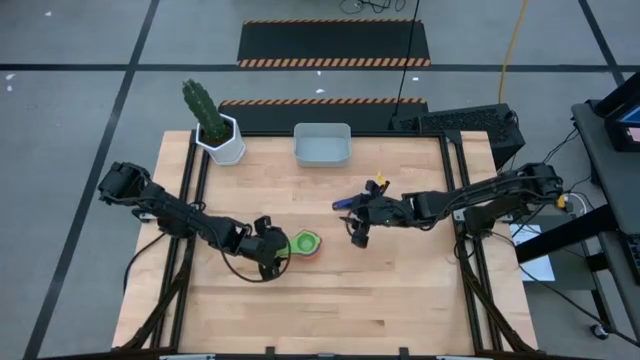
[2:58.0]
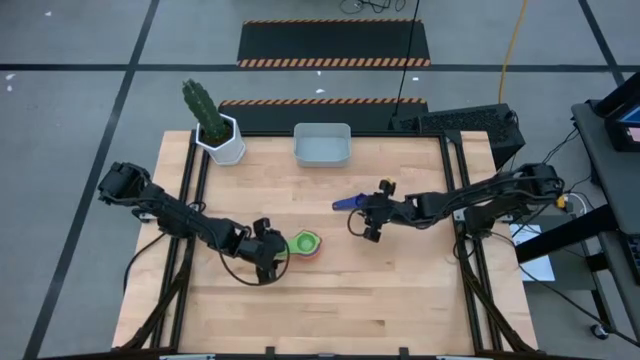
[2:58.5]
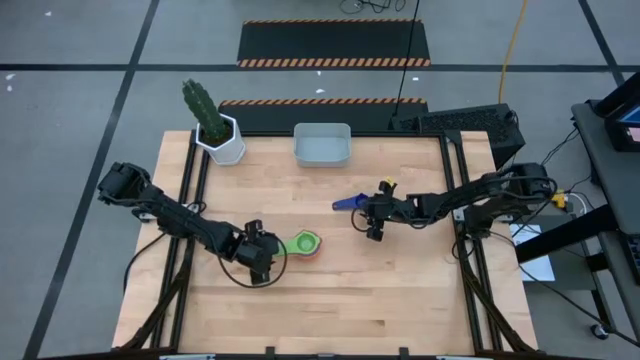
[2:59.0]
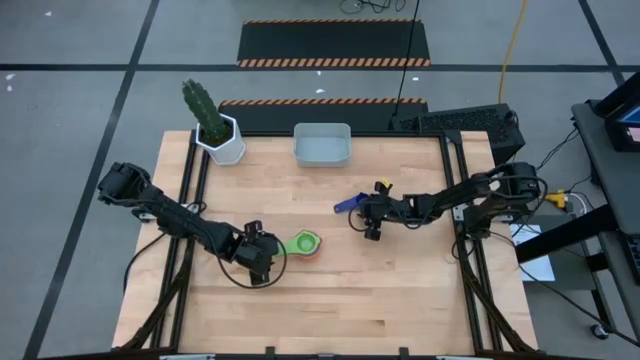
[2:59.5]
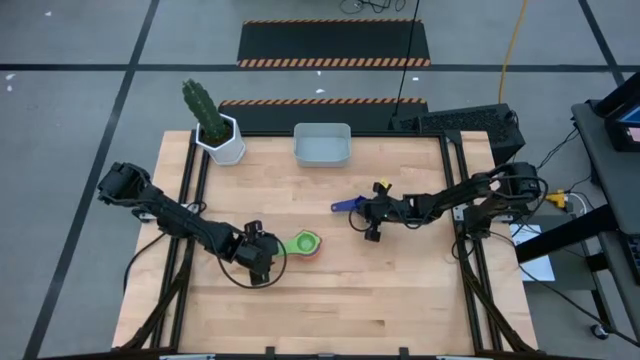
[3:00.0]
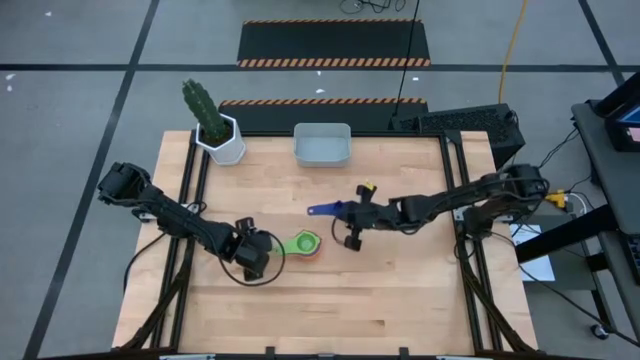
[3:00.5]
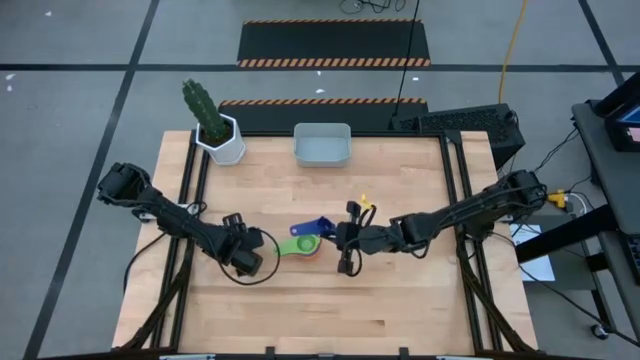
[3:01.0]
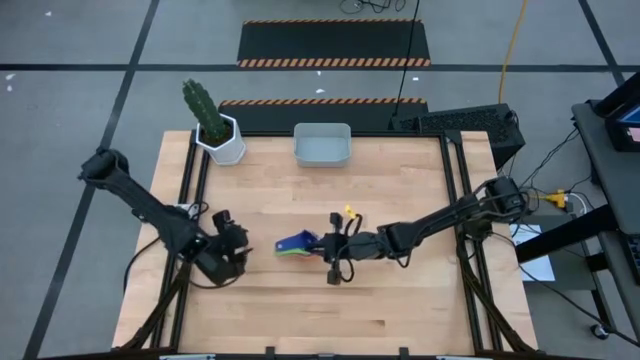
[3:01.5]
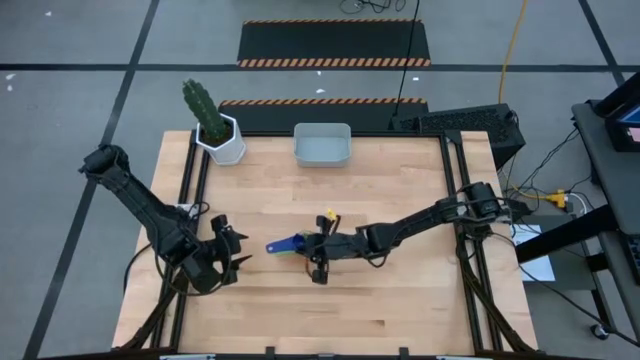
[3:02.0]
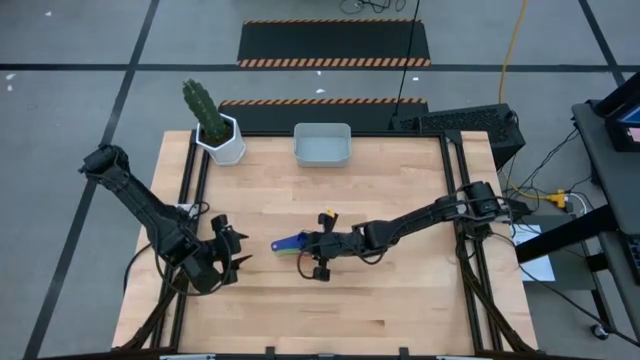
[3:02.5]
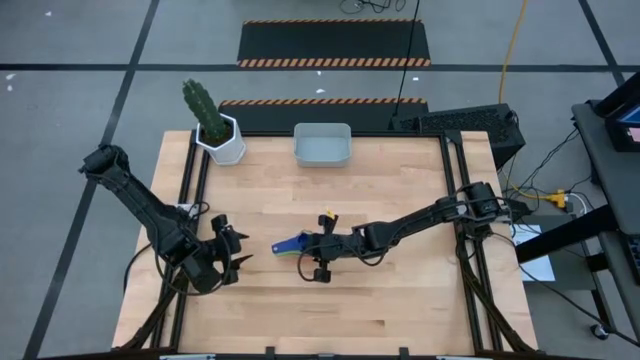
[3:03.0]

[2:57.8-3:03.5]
Task: Nest measuring cups in basket
Stack the violet measuring cup on top of the green measuring cup

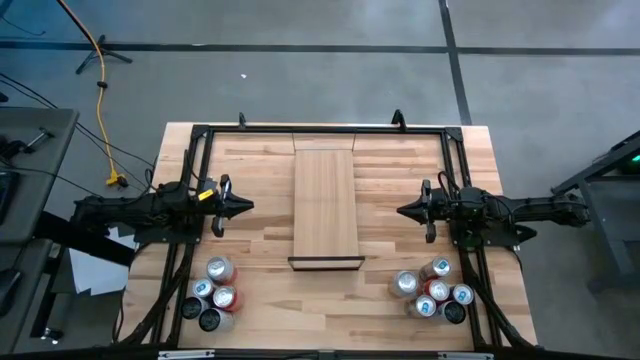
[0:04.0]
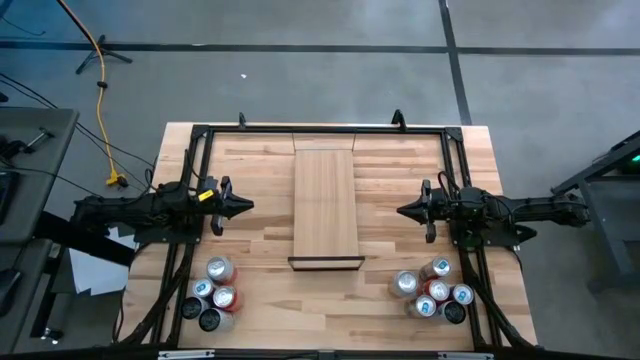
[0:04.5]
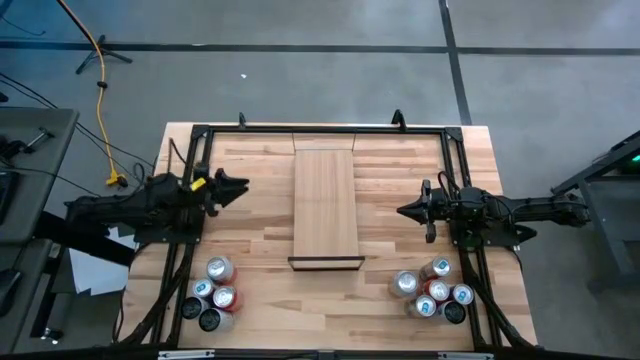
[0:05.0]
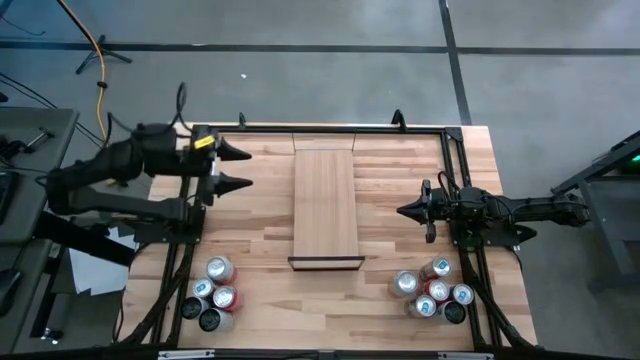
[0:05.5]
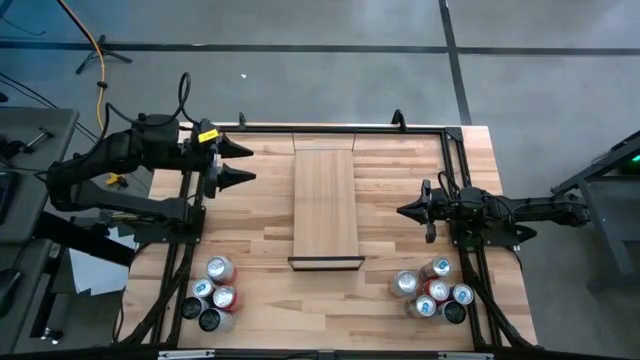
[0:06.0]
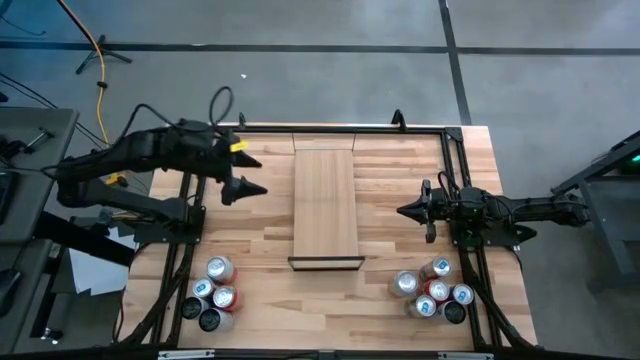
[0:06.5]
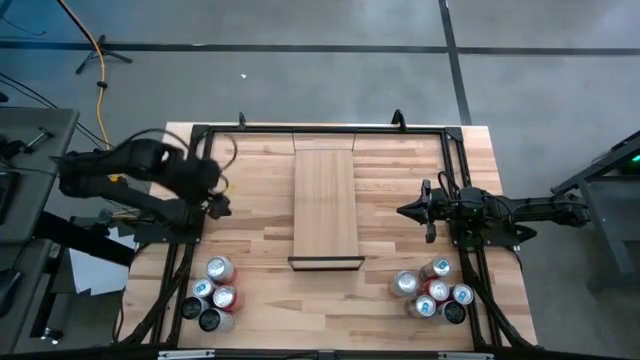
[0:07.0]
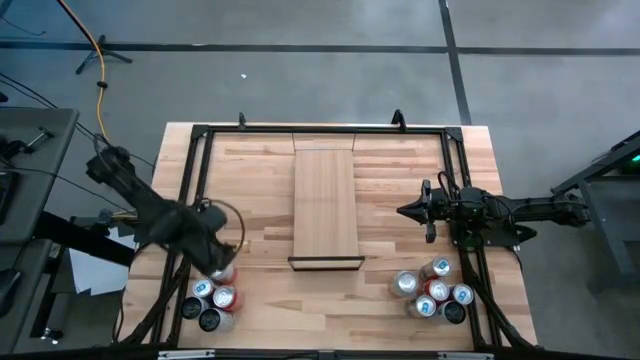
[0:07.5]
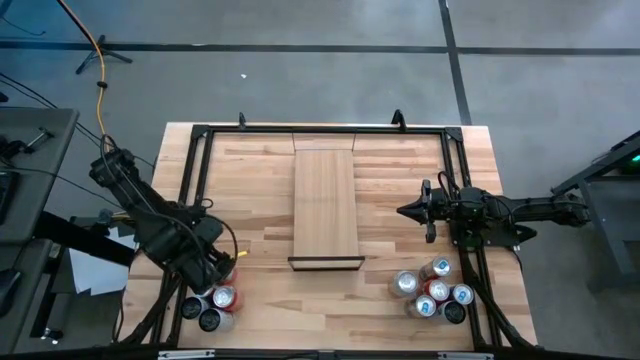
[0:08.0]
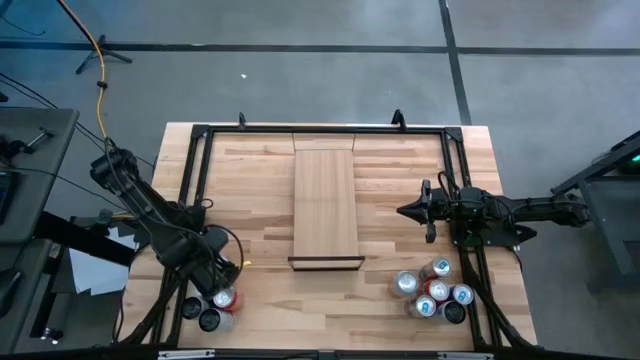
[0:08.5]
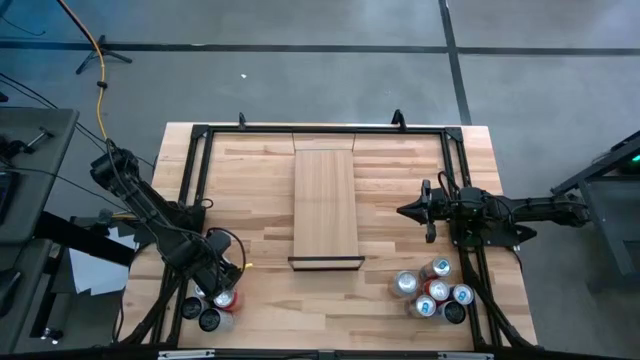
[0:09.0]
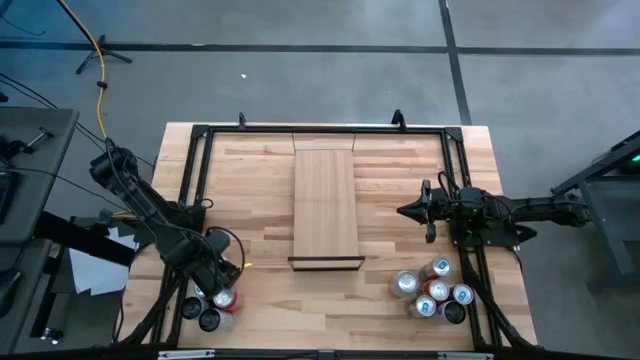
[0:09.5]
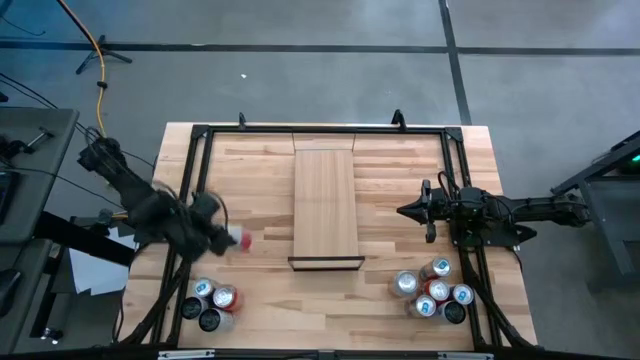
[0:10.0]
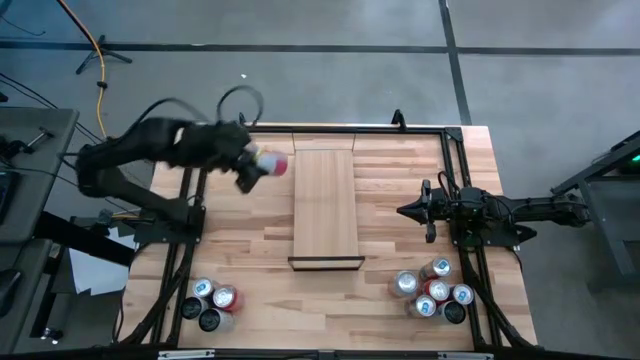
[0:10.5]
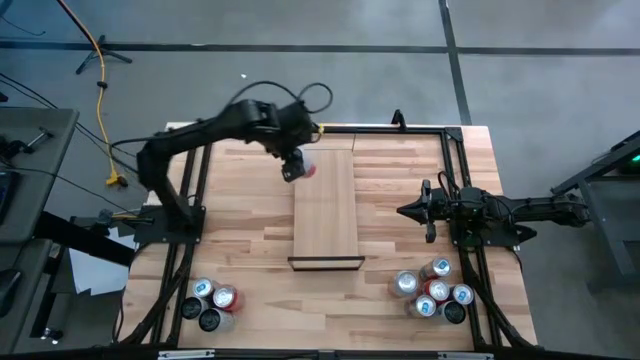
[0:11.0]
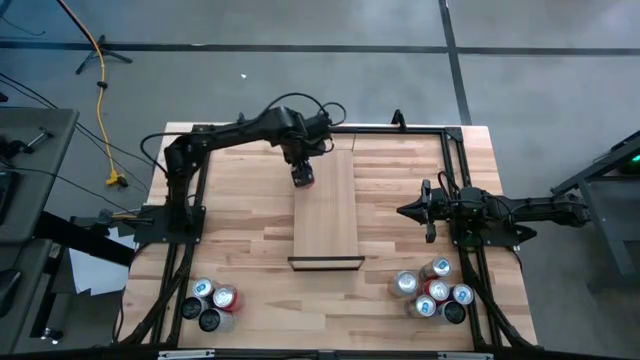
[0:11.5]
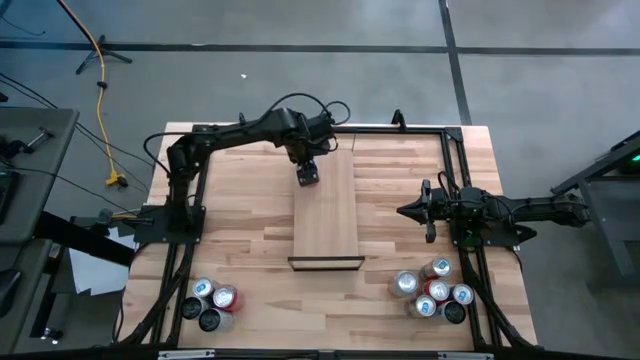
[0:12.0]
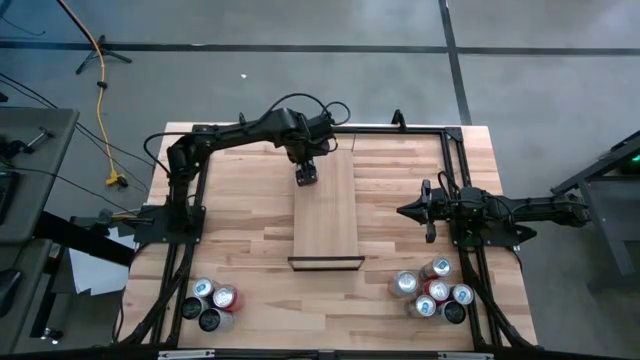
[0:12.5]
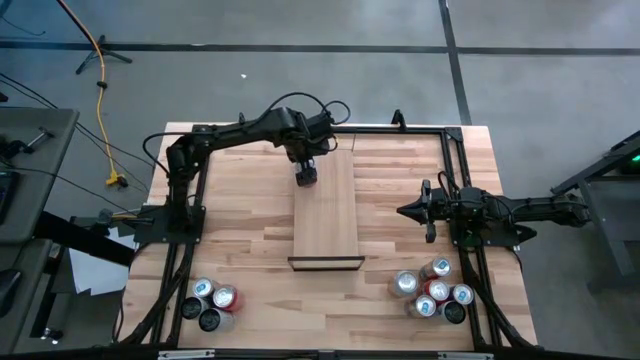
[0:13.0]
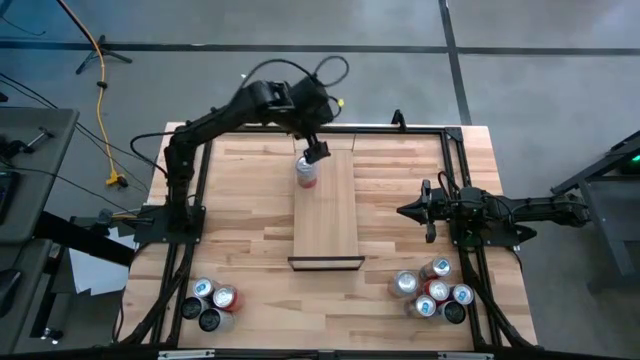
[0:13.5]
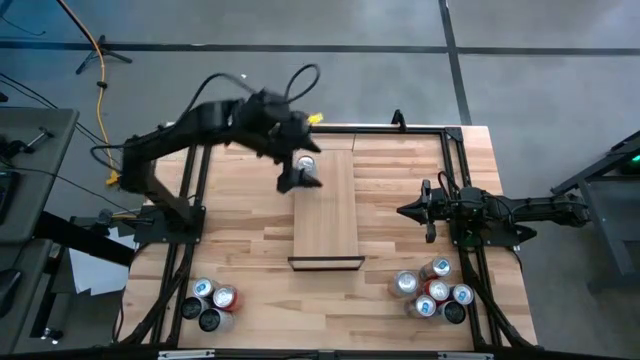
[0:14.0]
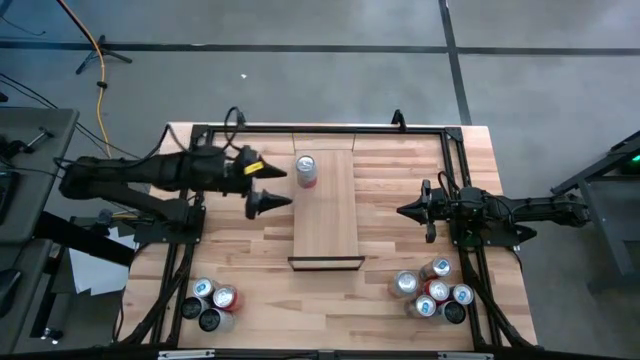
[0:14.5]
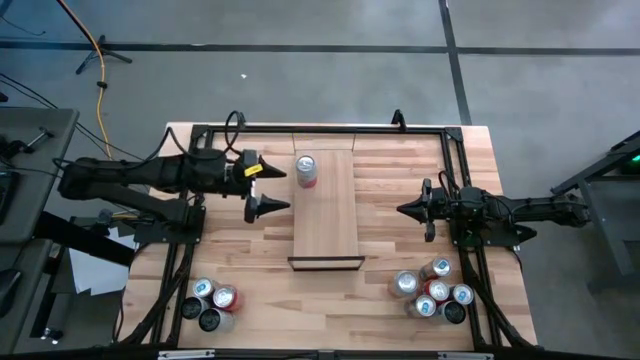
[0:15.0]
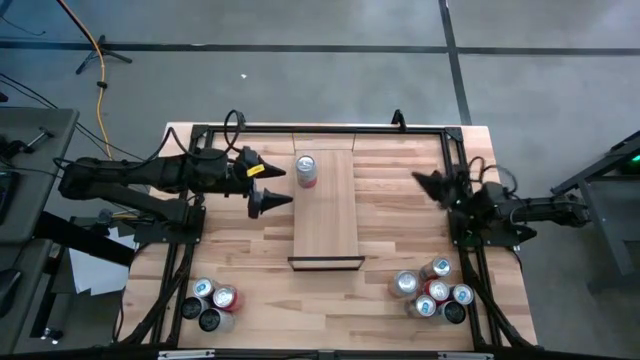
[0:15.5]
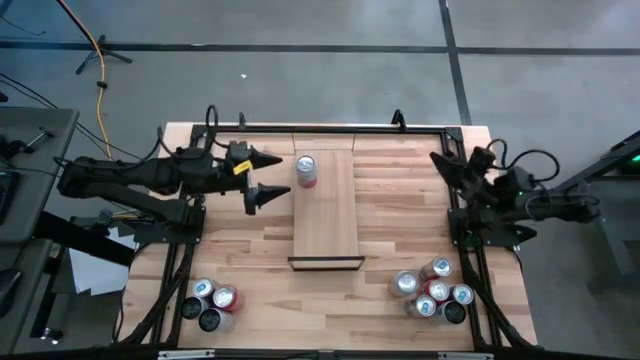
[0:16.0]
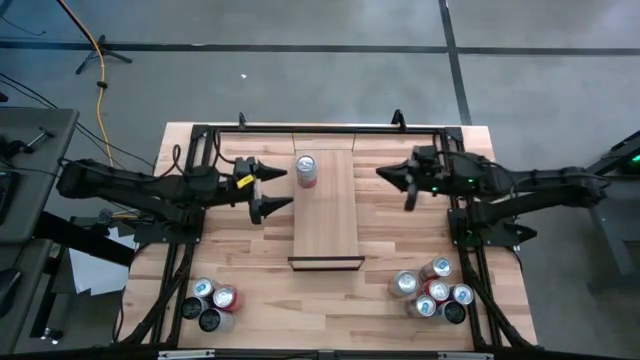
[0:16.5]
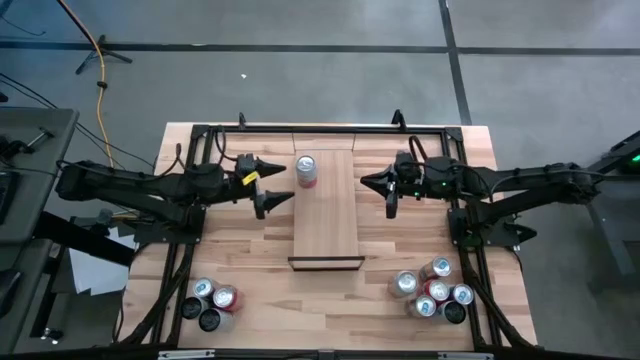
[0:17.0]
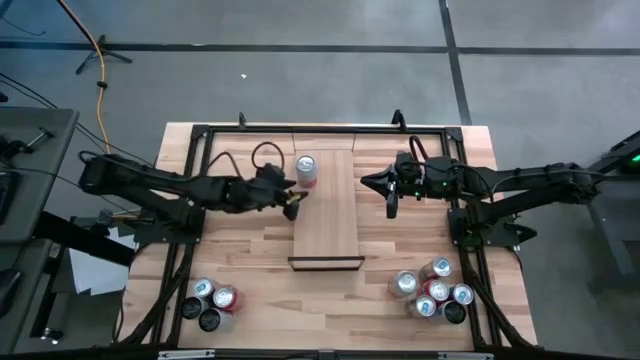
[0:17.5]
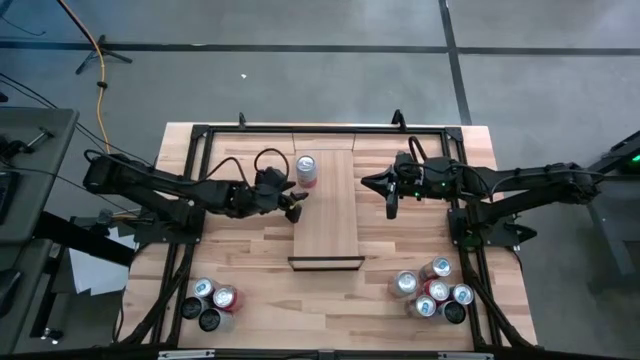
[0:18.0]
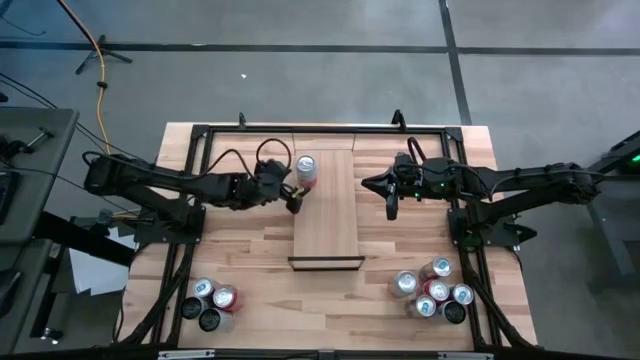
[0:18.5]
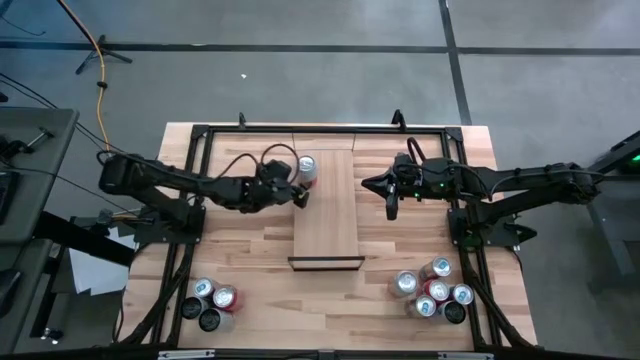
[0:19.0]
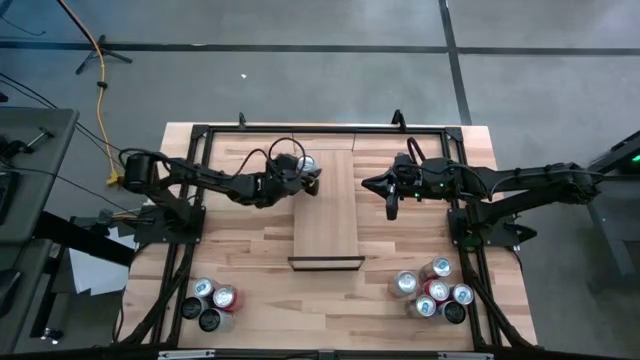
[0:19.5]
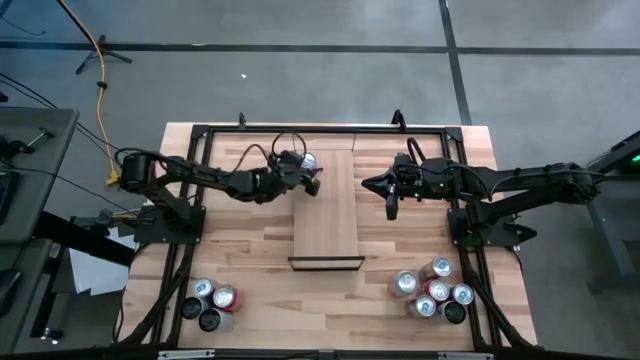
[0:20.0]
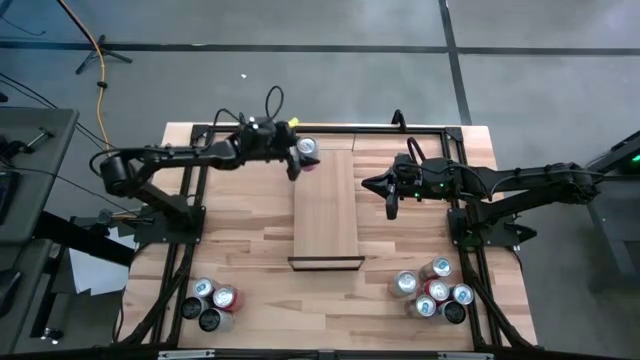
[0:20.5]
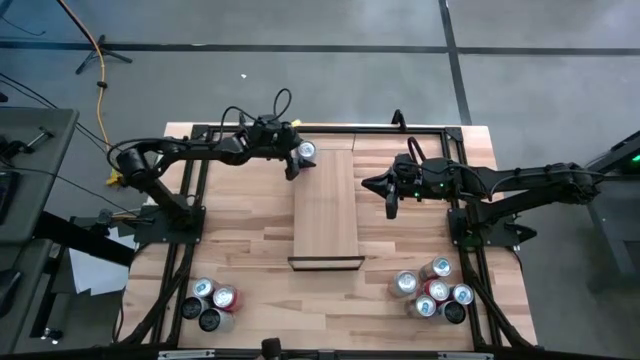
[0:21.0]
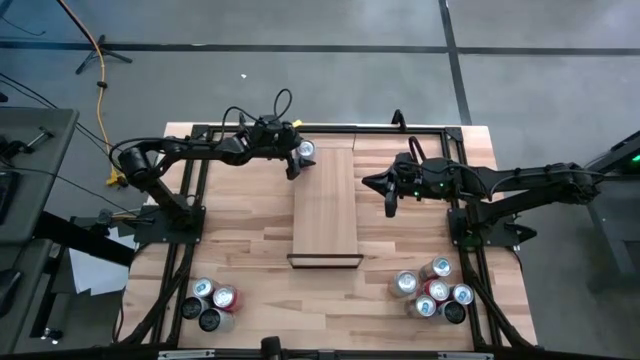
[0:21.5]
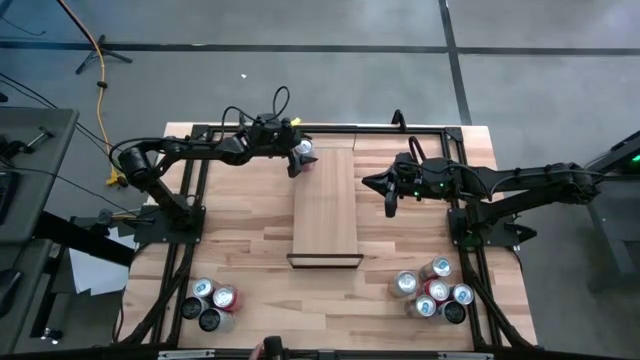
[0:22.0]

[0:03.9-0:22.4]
Task: Place canned beverage on shelf
Put the pink soda can on the shelf
